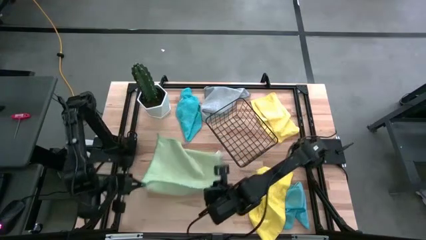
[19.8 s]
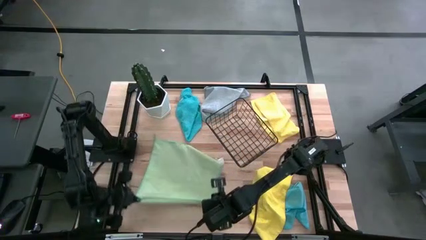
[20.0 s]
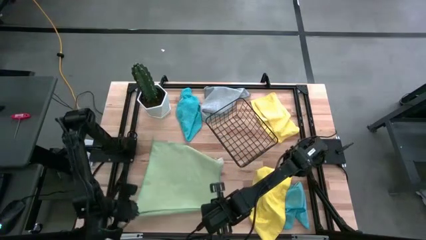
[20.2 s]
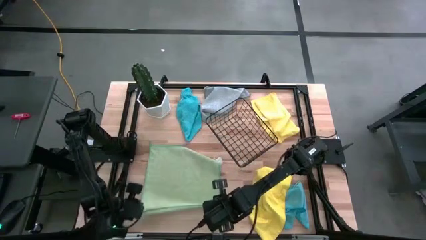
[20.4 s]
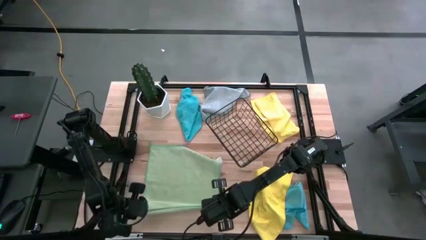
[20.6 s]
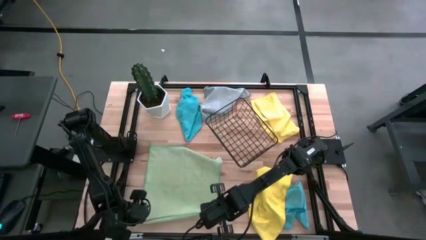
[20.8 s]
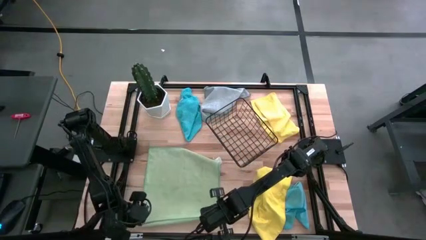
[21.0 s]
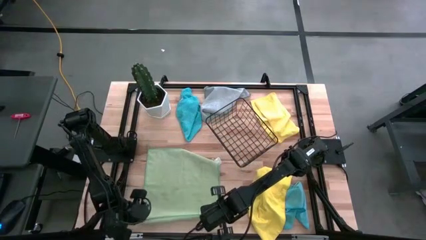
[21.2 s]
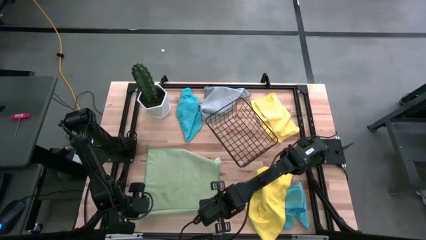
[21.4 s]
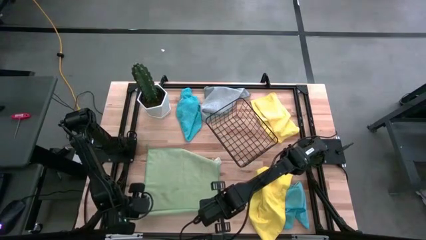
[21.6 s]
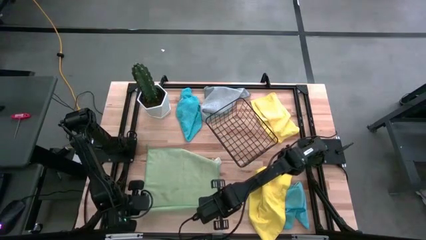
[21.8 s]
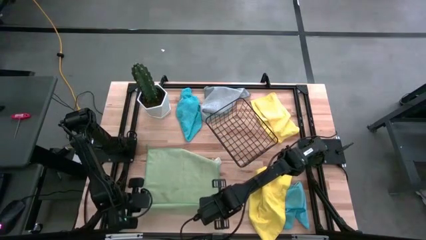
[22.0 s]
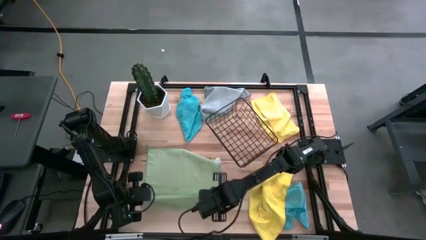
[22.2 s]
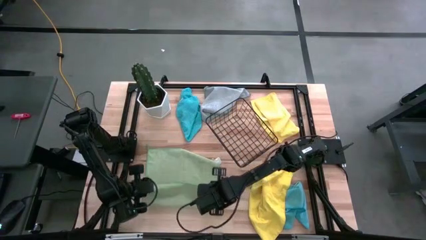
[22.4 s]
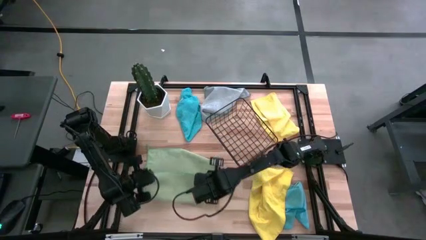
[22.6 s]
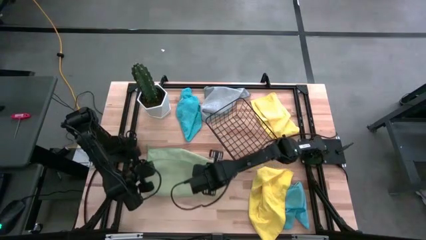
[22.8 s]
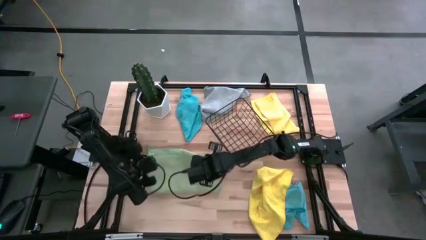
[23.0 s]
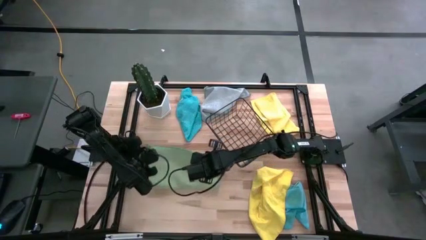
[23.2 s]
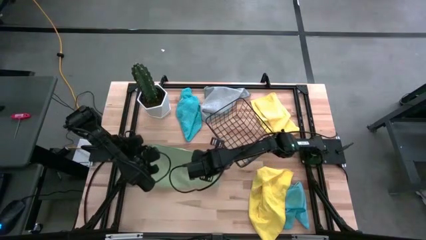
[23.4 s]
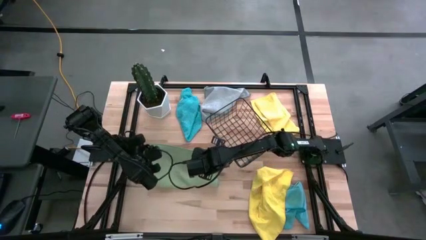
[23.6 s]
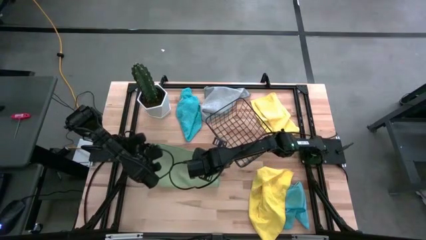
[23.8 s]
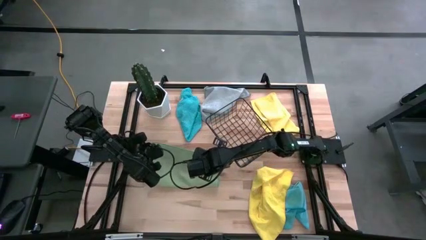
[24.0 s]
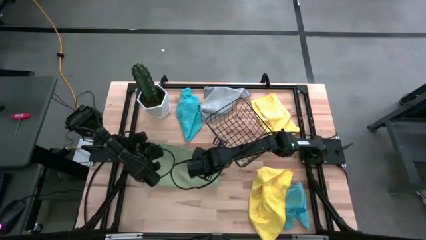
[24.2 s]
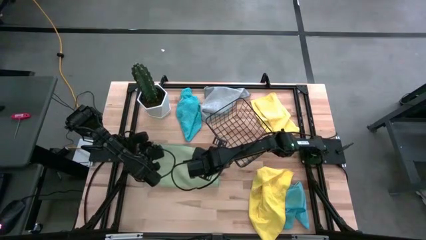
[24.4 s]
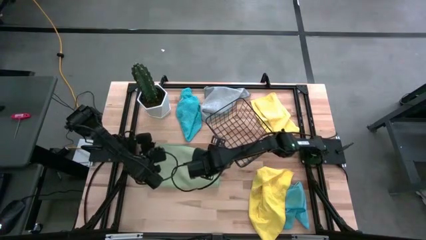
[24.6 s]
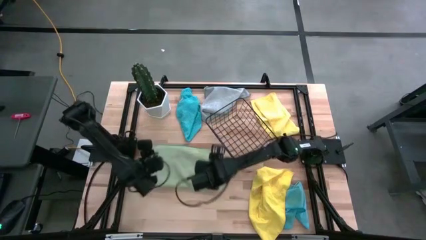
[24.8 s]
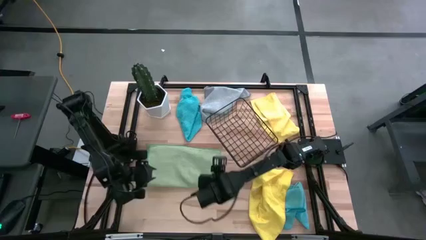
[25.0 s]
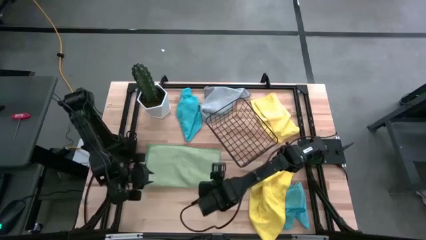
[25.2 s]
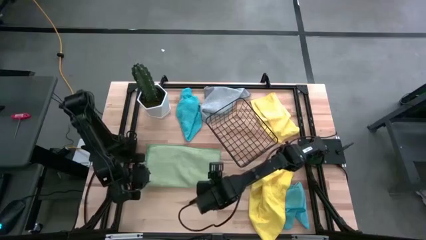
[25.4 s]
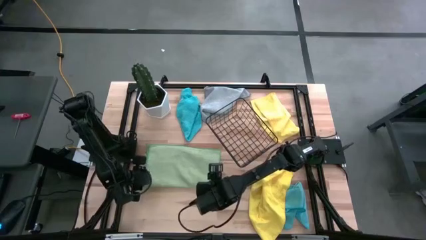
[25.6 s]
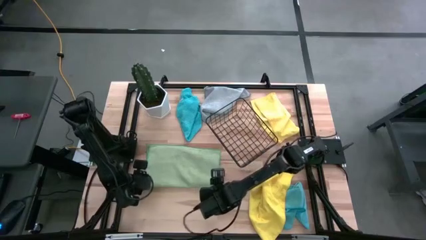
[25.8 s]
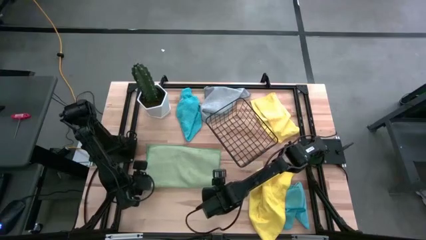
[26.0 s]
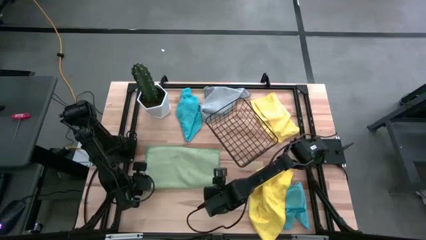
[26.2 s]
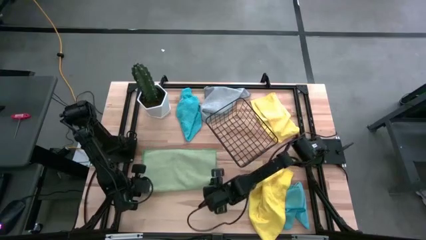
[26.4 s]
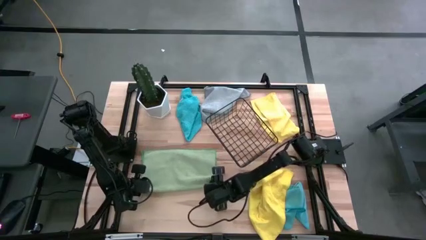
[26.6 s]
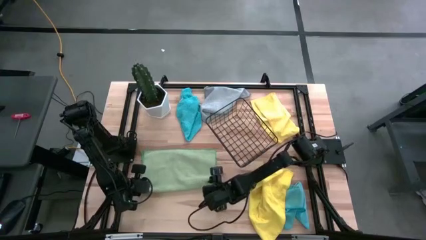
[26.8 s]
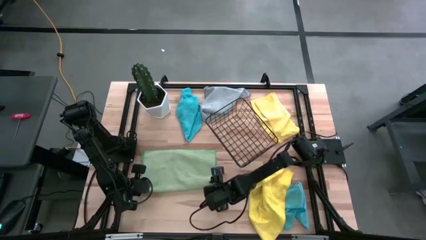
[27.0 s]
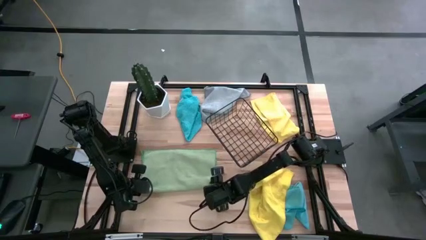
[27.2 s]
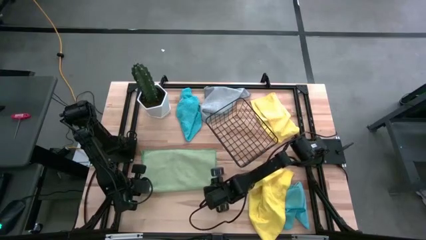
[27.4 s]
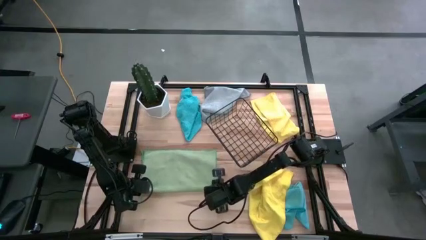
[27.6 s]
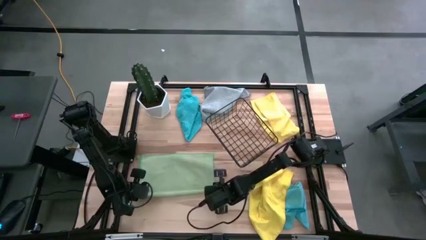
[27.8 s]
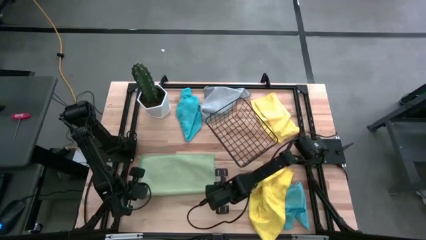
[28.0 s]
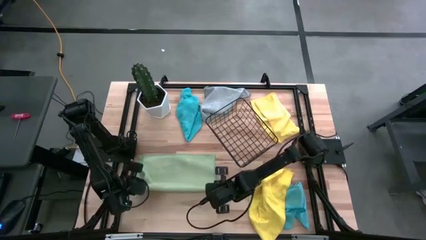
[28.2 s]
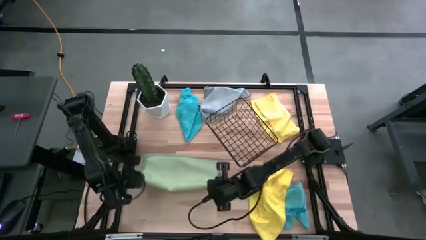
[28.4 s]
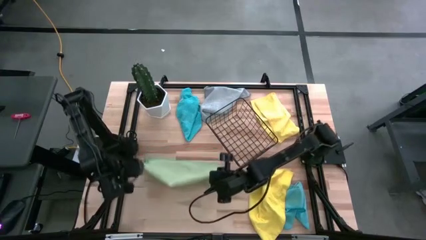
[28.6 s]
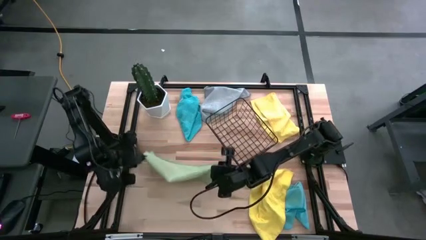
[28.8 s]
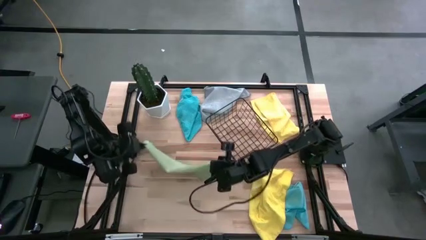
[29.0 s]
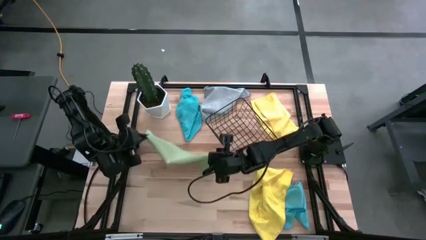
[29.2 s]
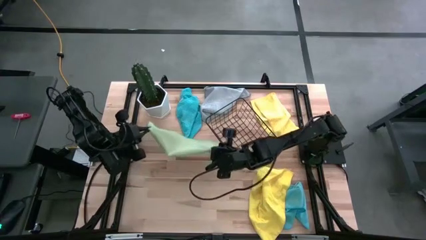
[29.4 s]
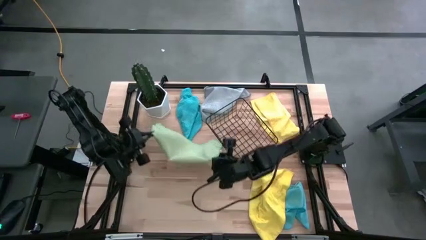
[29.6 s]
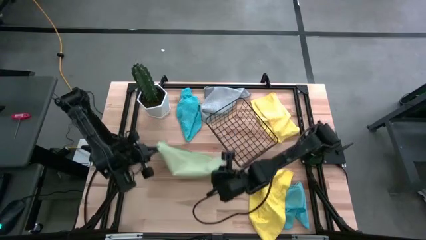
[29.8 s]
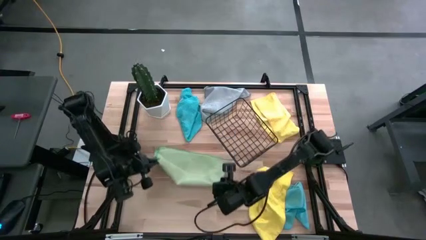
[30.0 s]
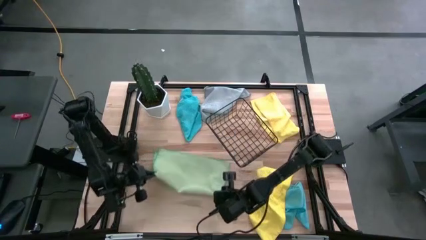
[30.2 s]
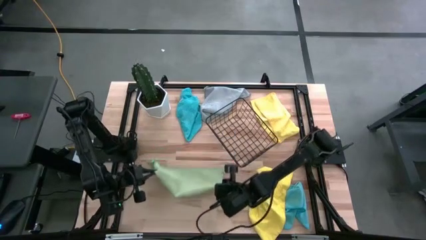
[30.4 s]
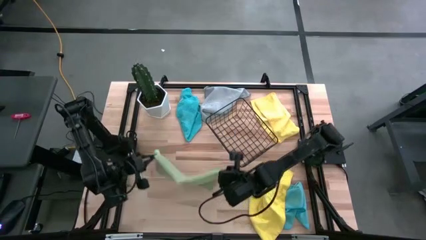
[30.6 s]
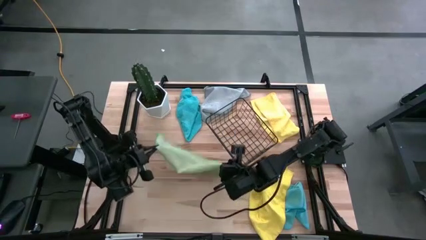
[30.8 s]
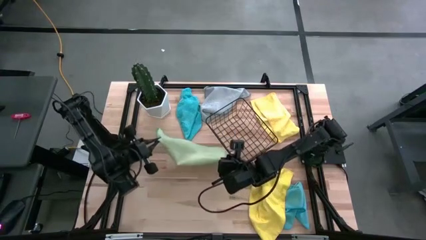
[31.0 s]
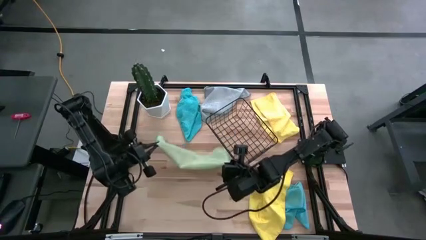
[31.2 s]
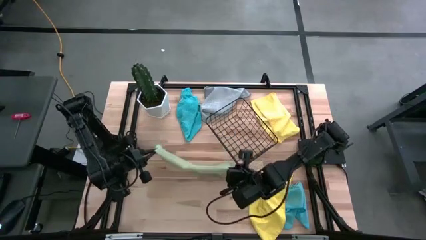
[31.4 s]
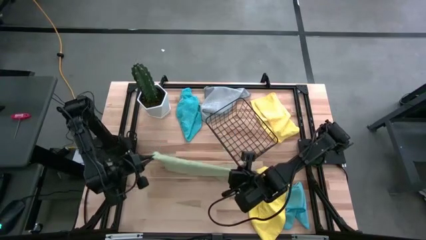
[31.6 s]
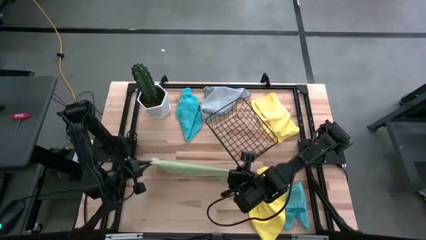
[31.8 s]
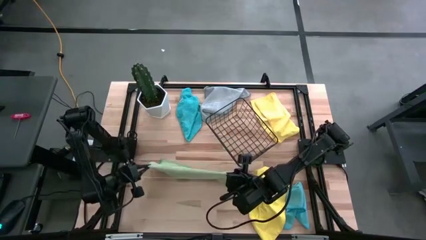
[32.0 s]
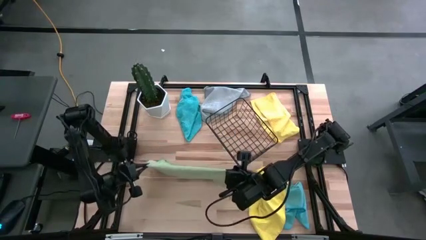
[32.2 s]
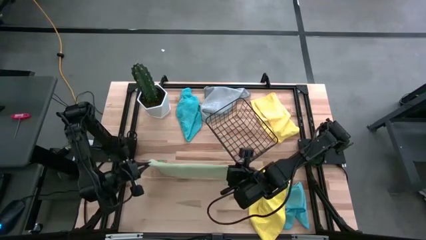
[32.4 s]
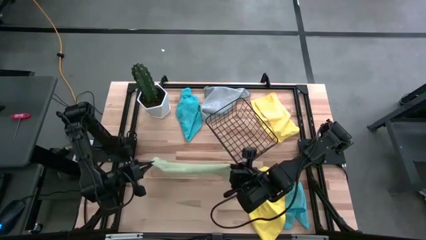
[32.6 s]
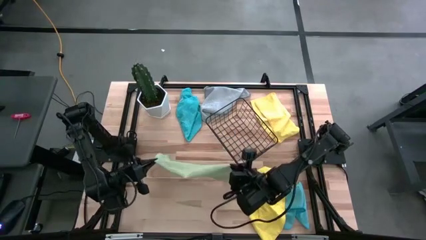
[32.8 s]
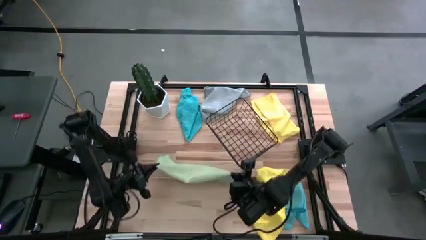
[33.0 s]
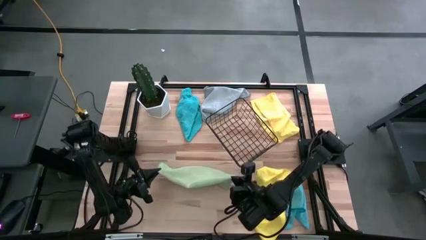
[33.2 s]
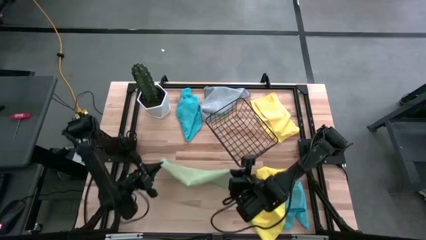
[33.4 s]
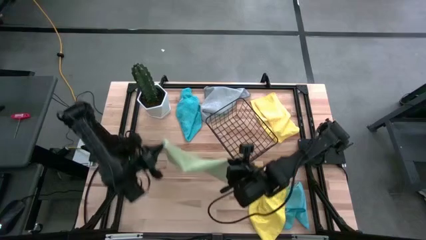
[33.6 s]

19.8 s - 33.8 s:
Task: Fold microfiber towels
Fold the green microfiber towel
